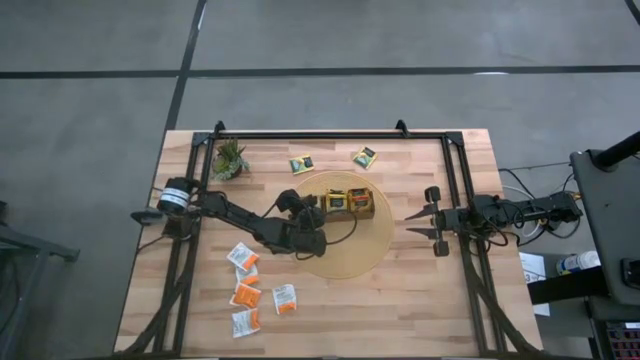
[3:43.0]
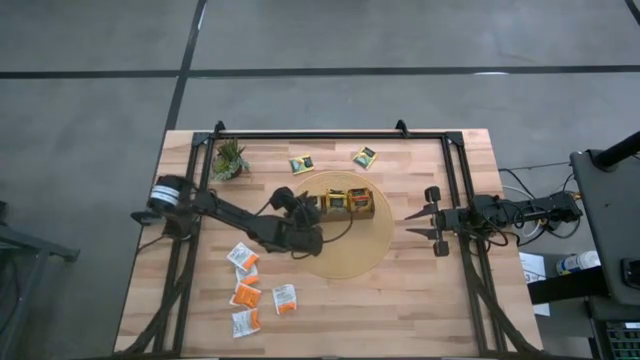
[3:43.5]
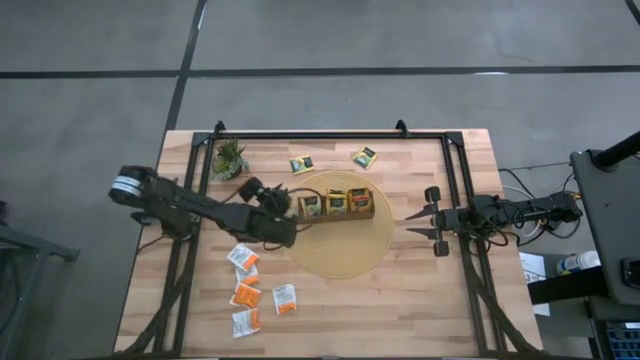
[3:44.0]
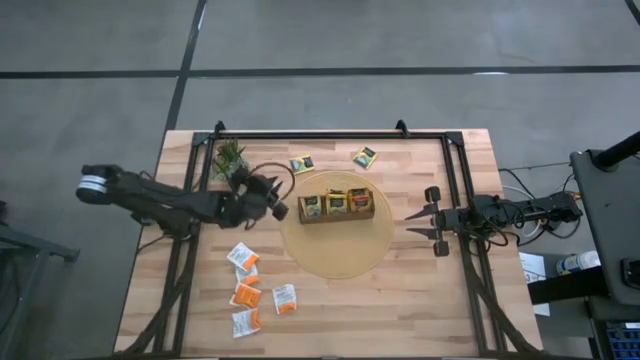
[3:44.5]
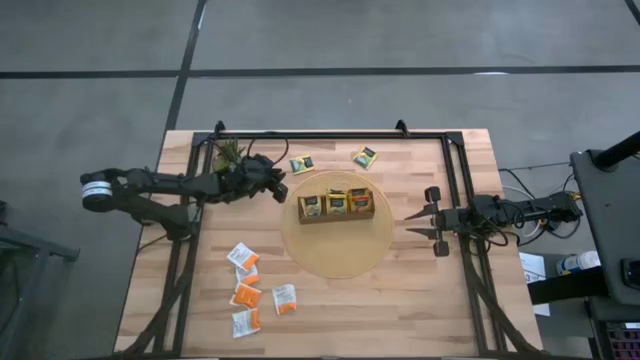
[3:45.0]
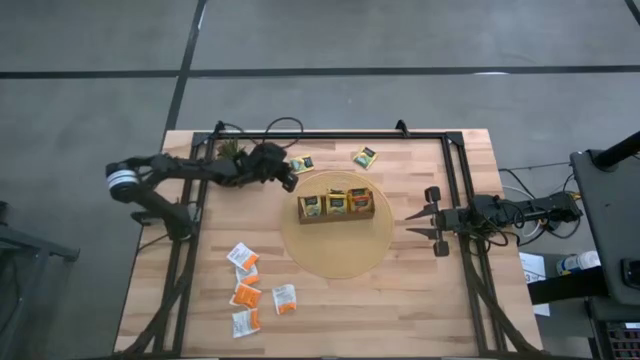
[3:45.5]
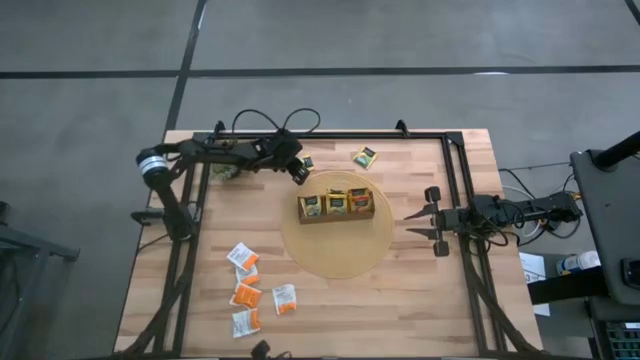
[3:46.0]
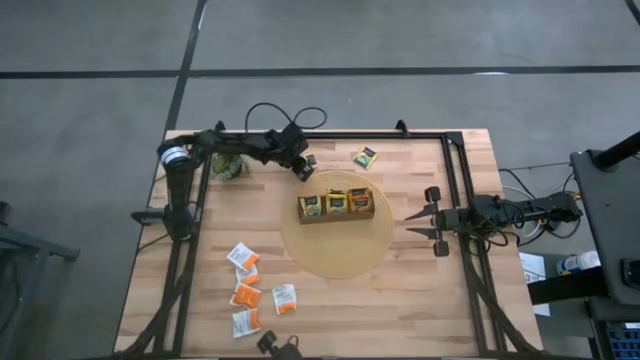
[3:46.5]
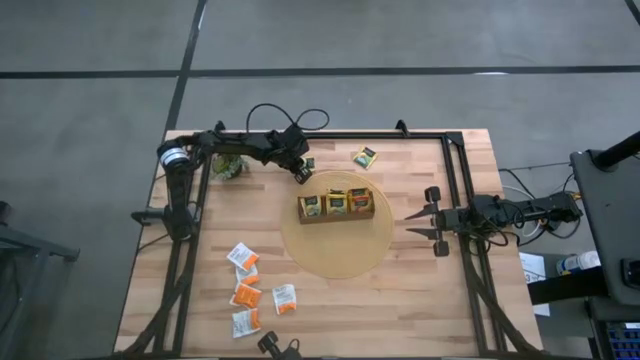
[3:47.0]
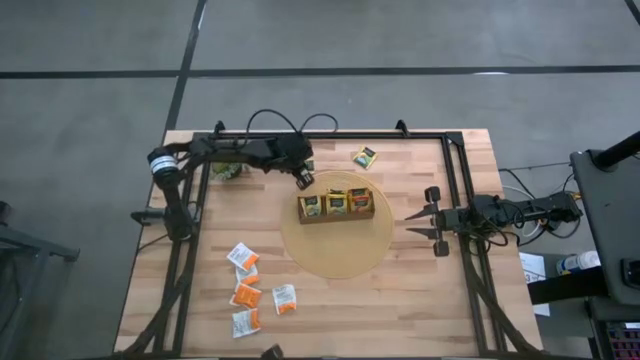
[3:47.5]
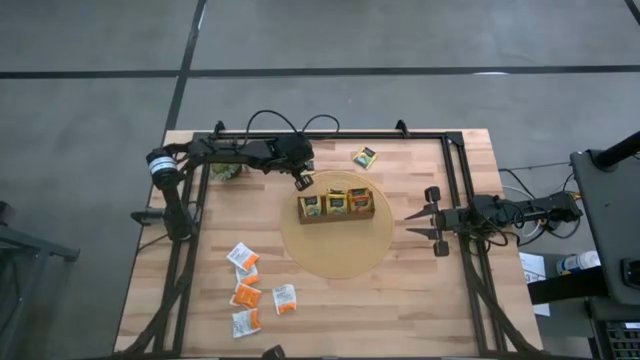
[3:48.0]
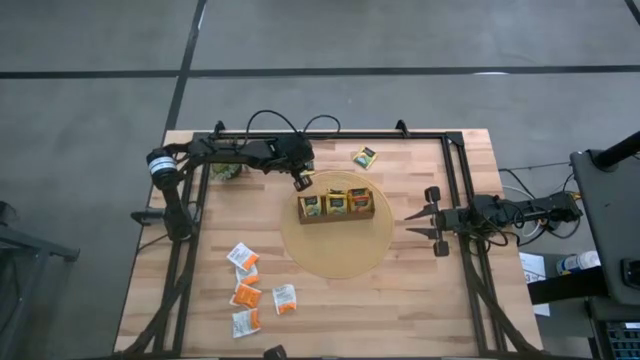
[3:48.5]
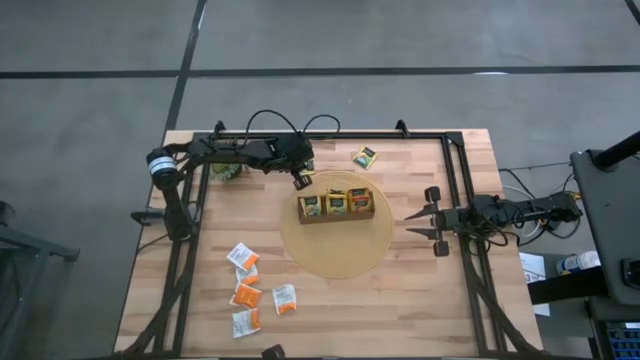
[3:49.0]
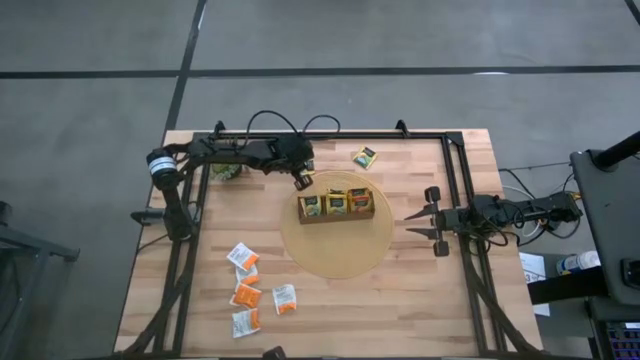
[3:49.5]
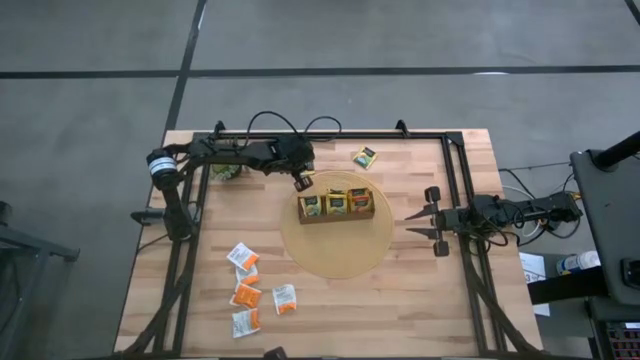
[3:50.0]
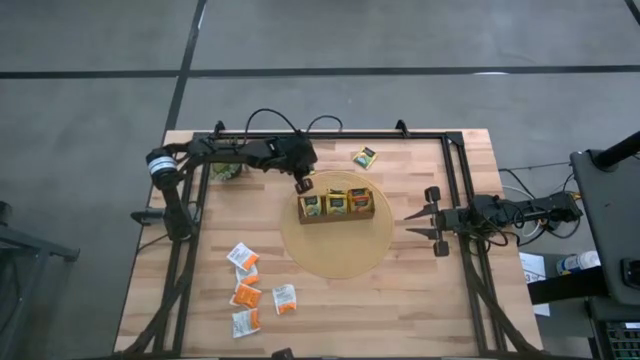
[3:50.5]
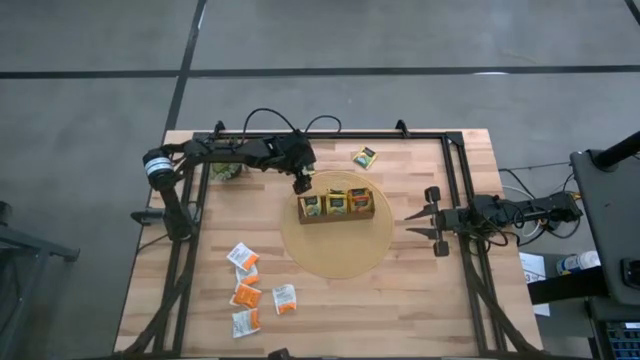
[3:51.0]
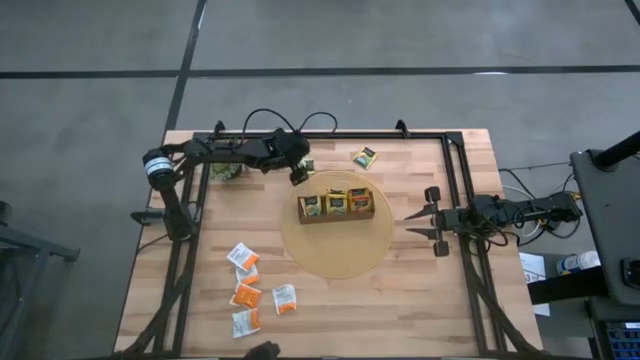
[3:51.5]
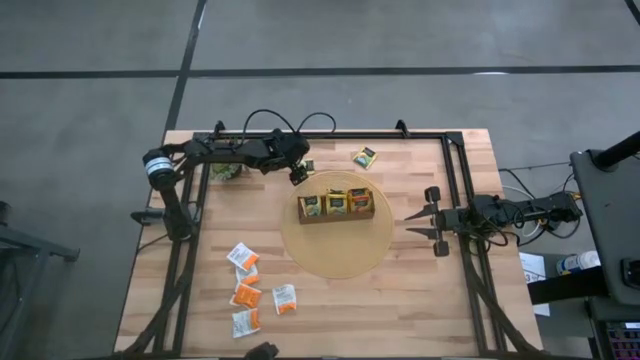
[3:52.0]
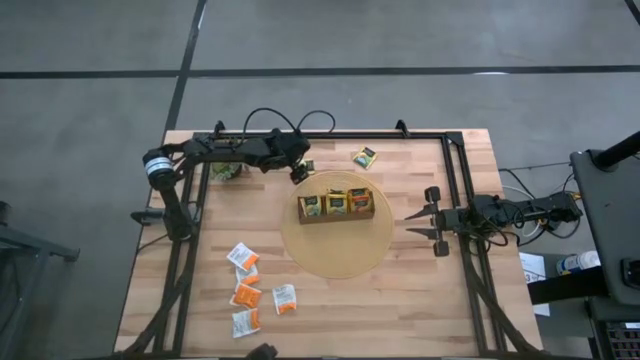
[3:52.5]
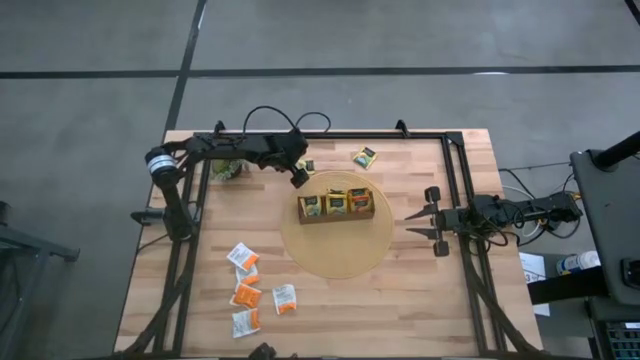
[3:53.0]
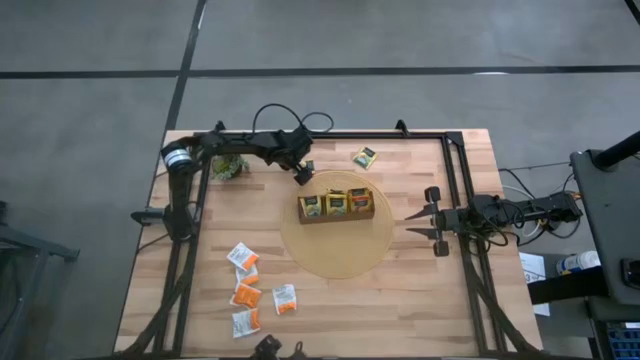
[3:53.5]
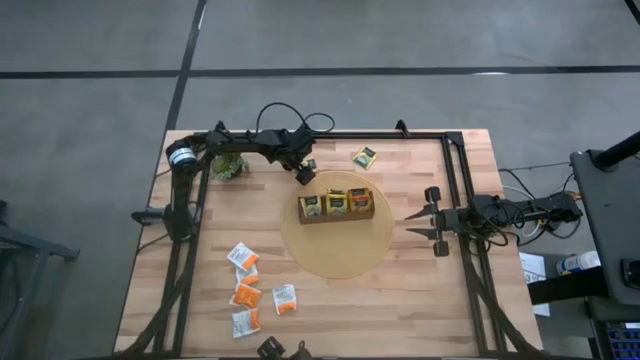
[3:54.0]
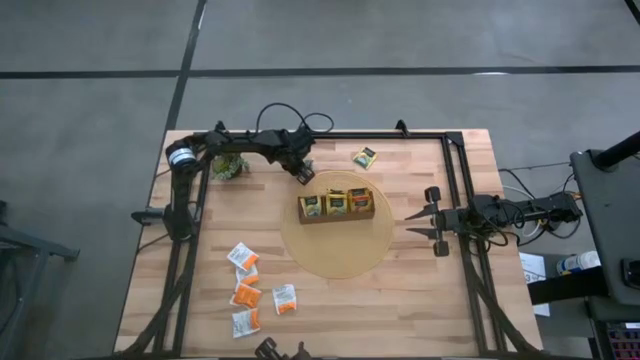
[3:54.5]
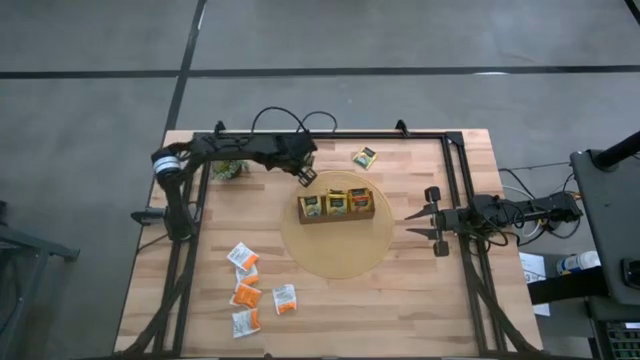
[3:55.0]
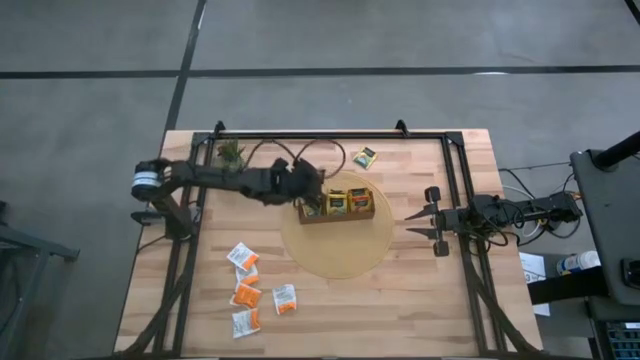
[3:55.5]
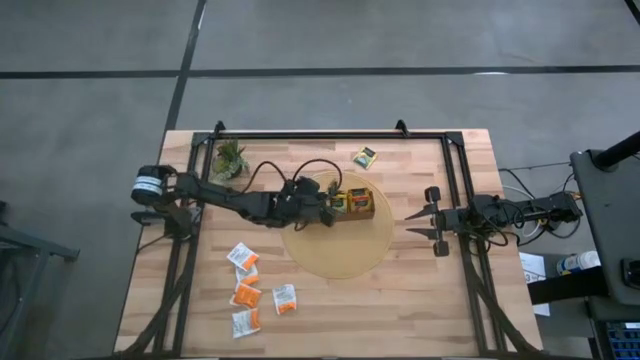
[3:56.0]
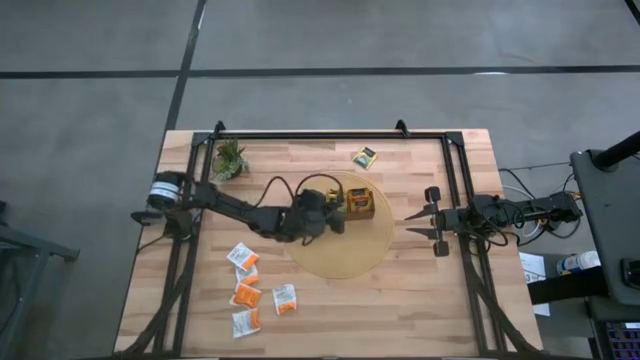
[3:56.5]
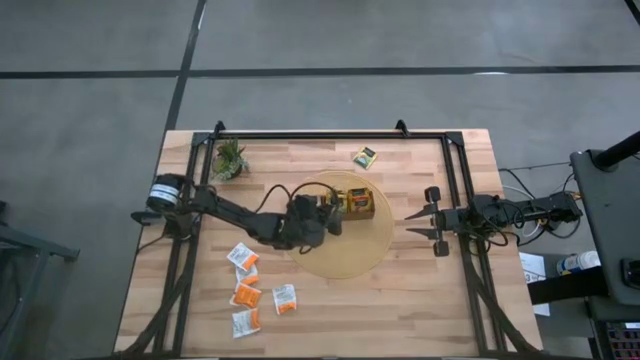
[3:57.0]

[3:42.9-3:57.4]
Task: Pick & Place Tea
Put the yellow tea bag into the middle section of the wooden organizer

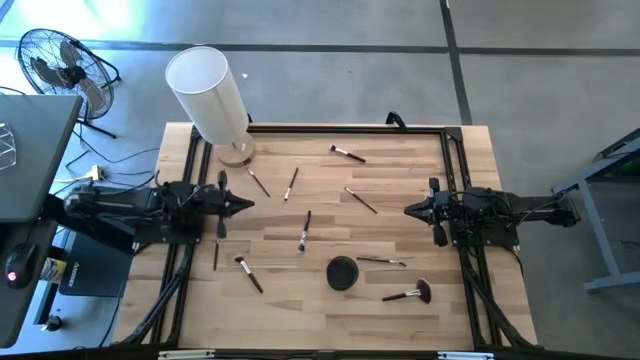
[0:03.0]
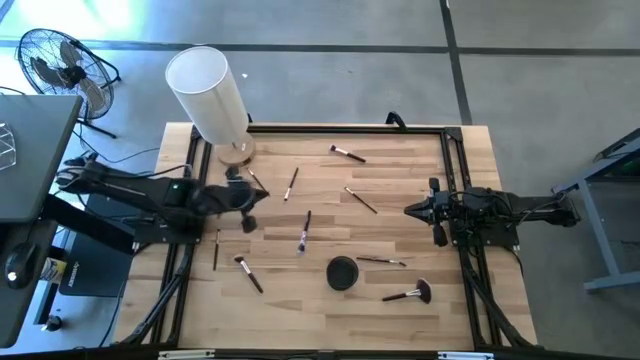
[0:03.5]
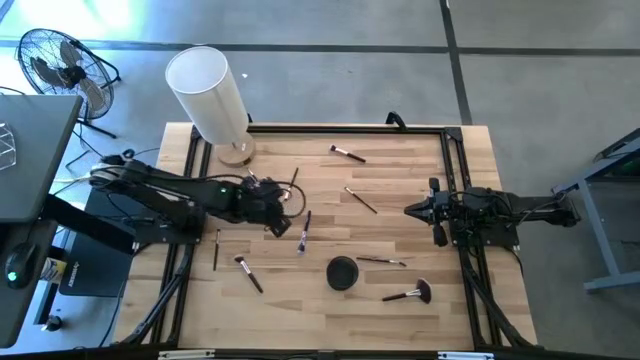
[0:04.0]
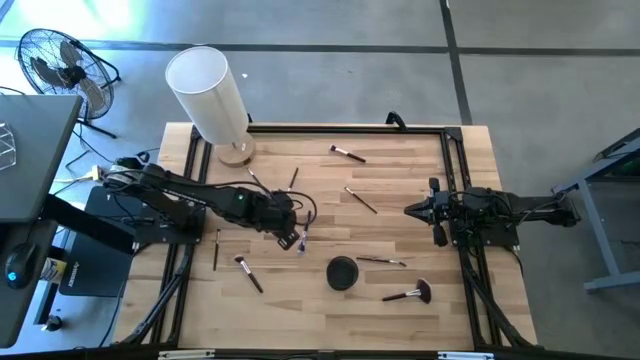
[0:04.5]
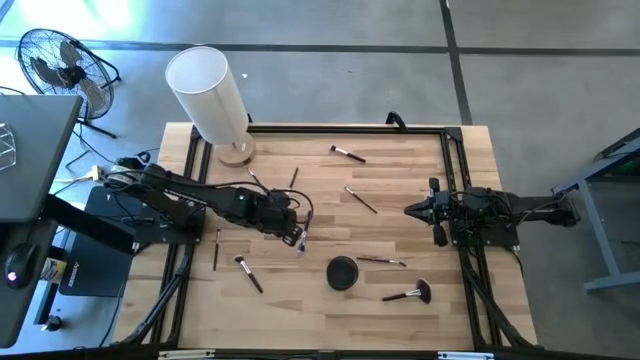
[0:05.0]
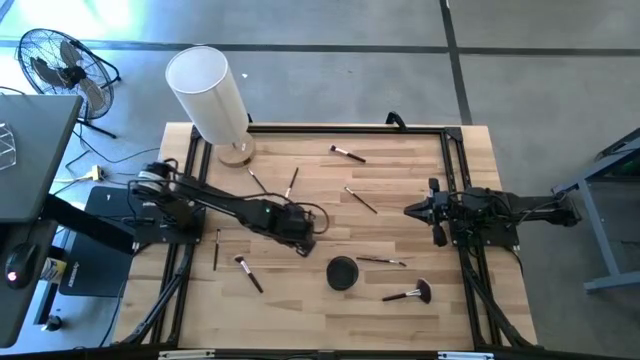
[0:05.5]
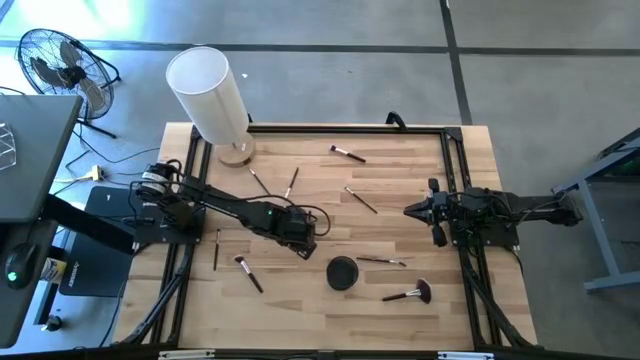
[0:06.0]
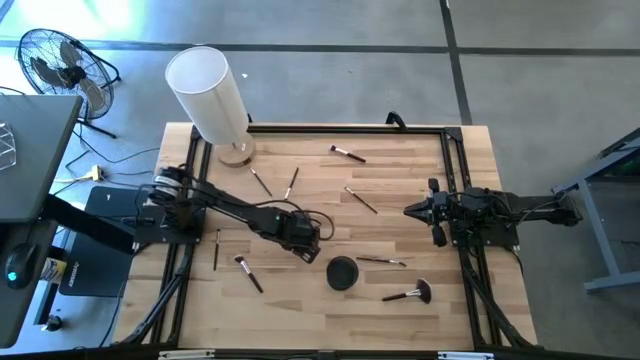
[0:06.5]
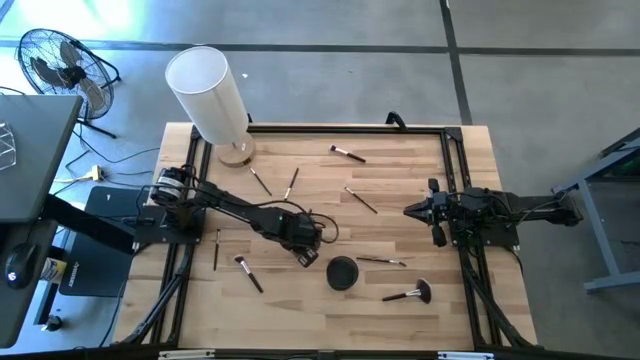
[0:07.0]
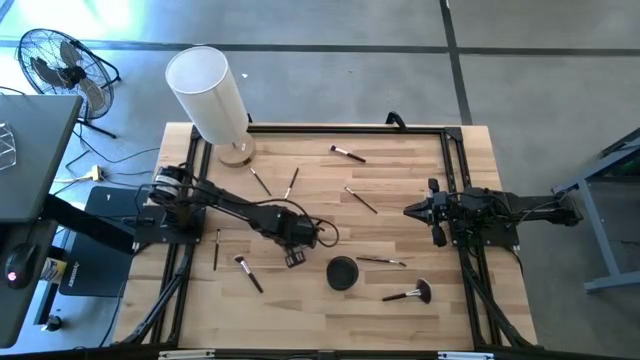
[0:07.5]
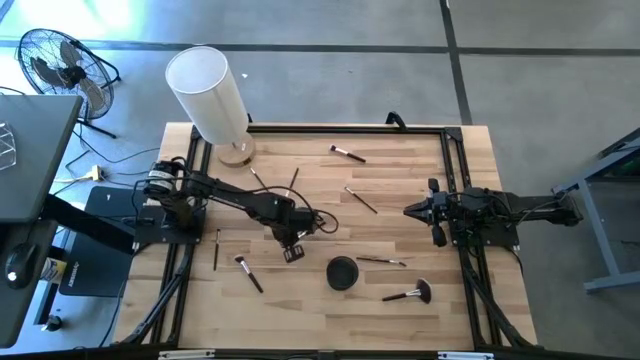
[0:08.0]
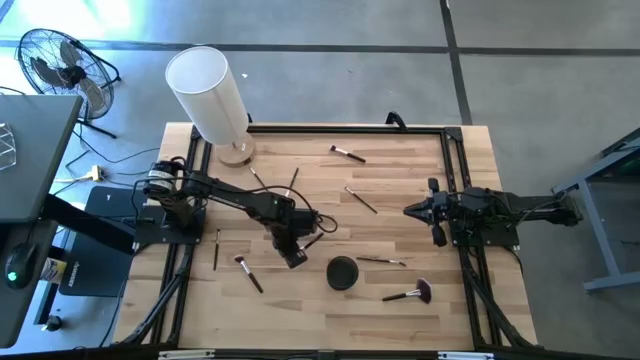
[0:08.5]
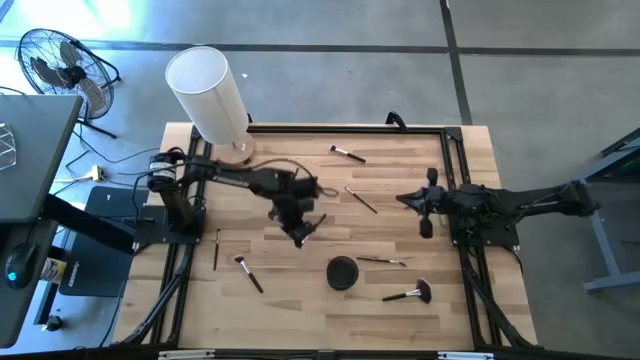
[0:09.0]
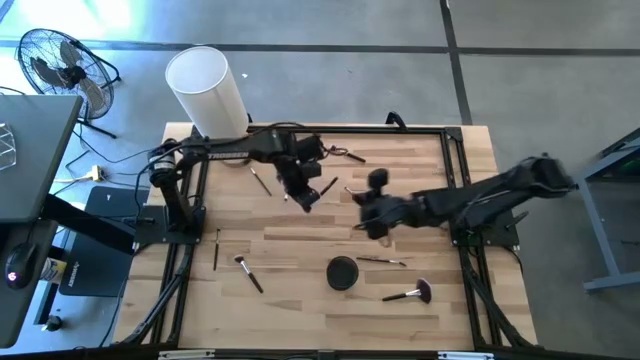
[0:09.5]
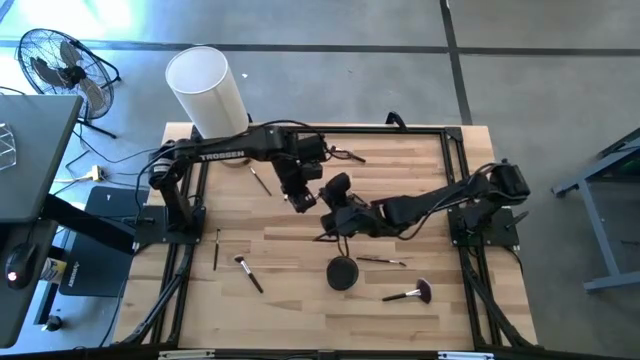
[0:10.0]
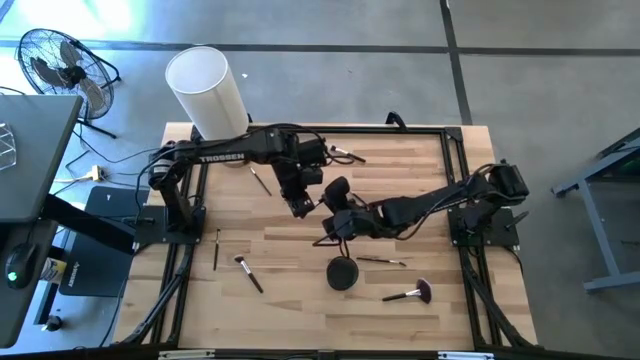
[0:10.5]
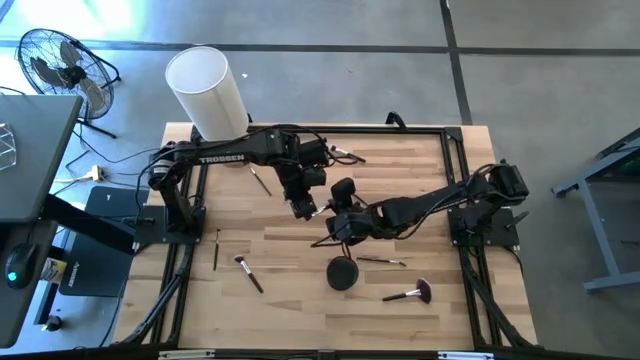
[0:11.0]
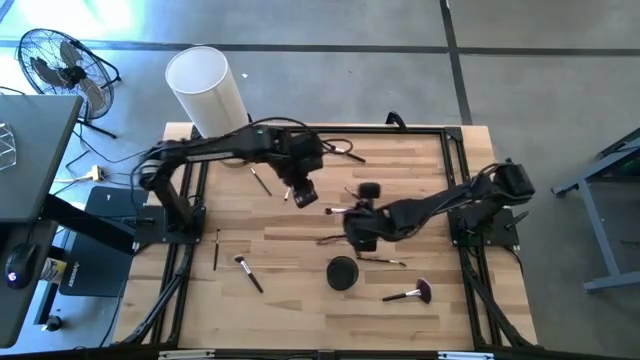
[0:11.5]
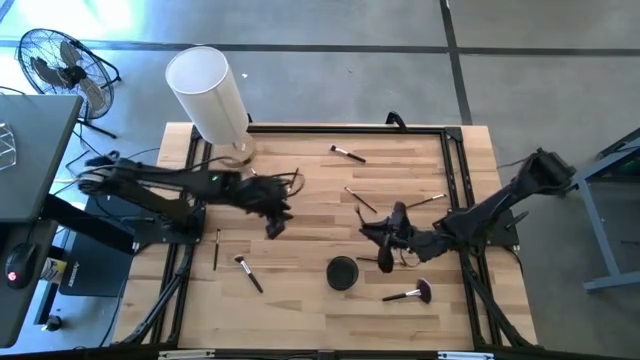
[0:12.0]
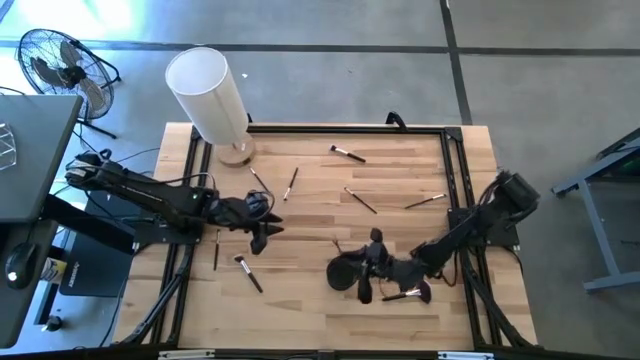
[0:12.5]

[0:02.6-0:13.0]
Task: Pick & Place Makeup Supplies
Put the makeup brush into the black makeup holder
